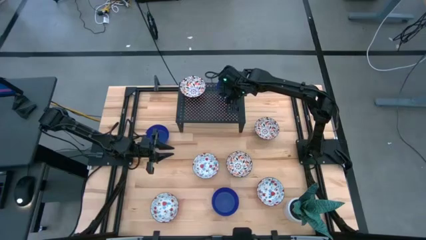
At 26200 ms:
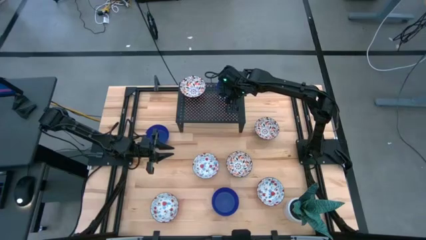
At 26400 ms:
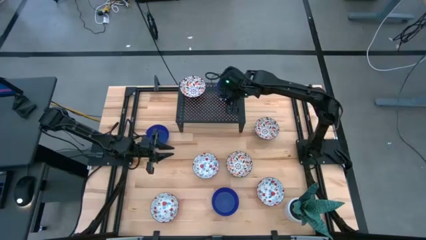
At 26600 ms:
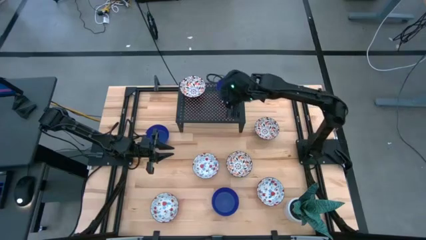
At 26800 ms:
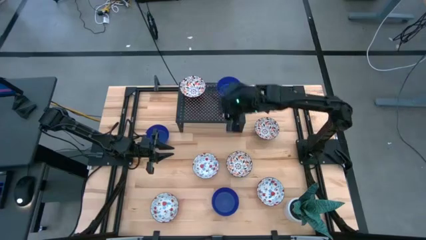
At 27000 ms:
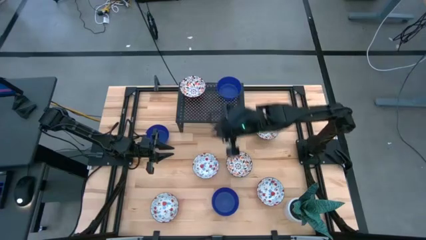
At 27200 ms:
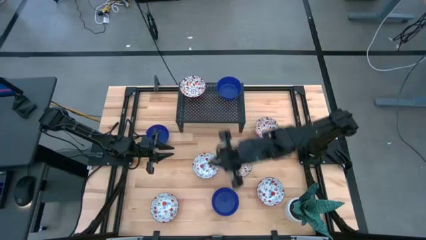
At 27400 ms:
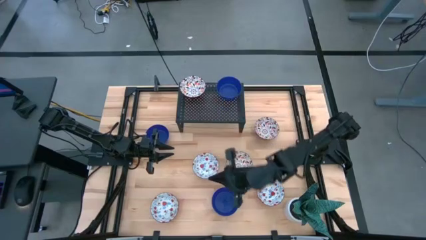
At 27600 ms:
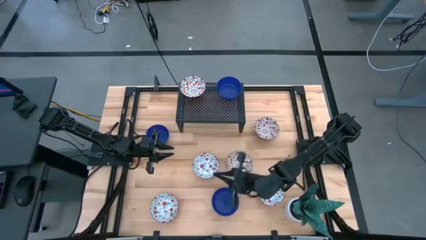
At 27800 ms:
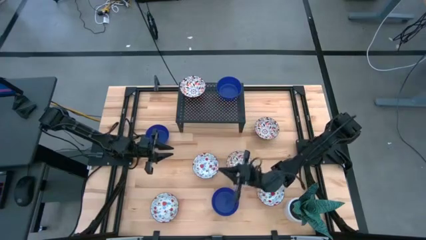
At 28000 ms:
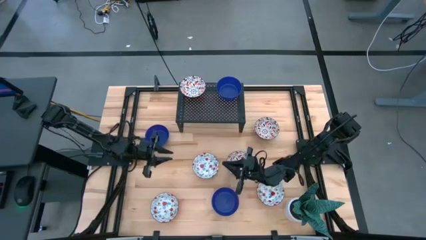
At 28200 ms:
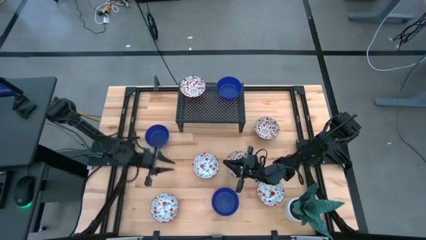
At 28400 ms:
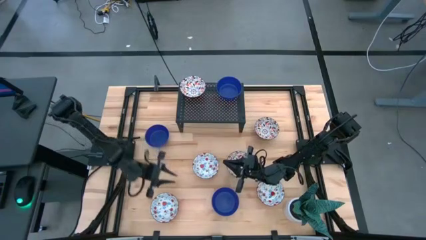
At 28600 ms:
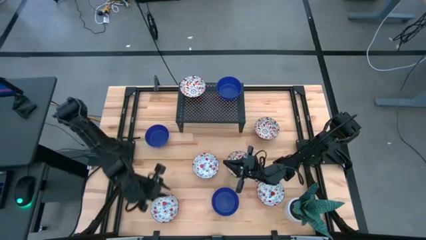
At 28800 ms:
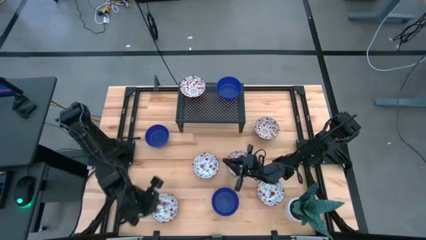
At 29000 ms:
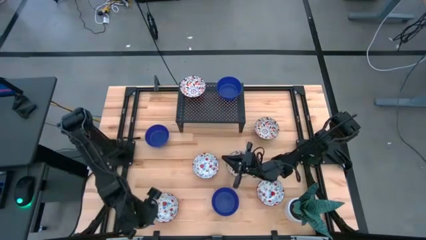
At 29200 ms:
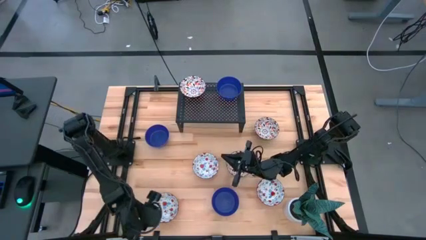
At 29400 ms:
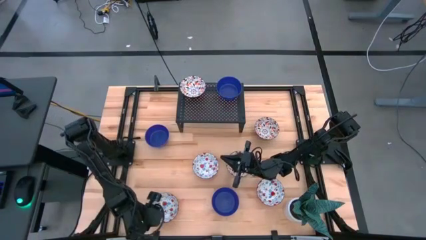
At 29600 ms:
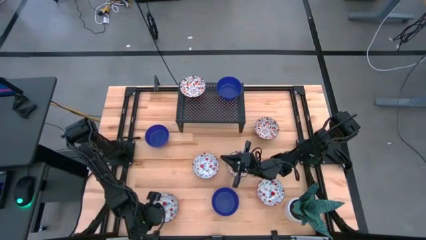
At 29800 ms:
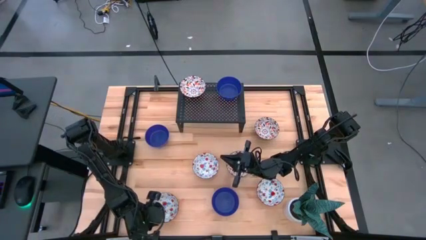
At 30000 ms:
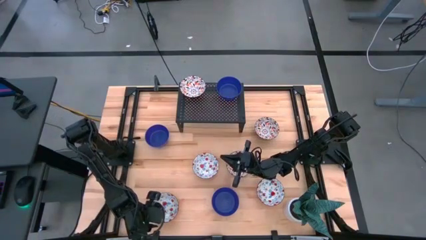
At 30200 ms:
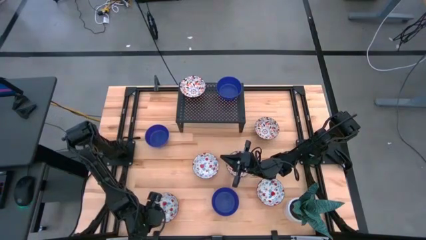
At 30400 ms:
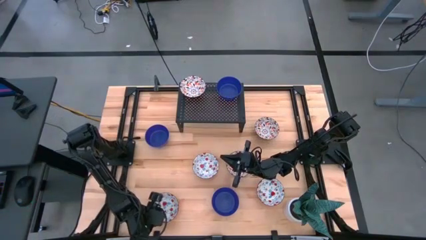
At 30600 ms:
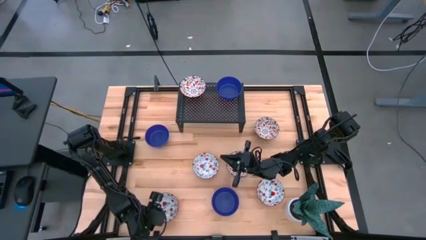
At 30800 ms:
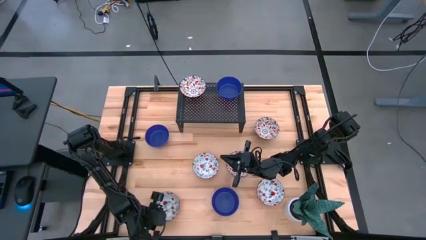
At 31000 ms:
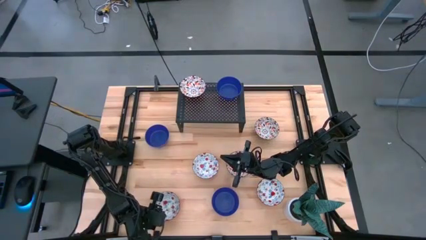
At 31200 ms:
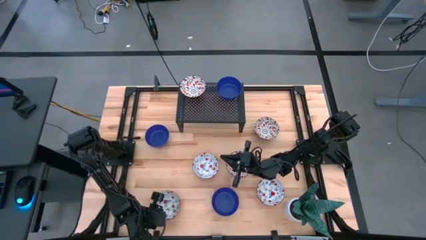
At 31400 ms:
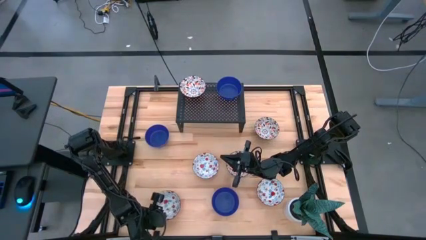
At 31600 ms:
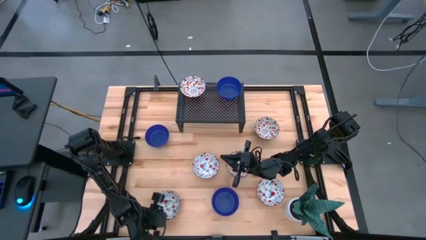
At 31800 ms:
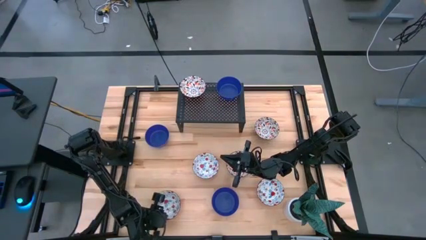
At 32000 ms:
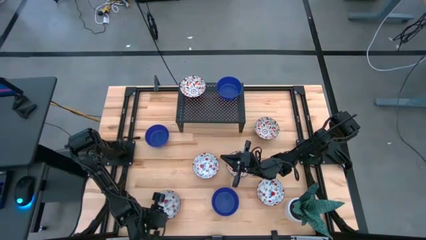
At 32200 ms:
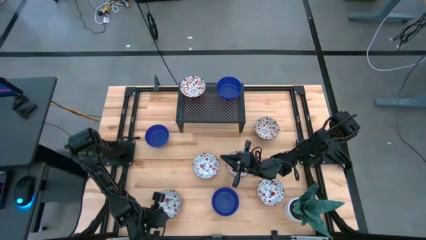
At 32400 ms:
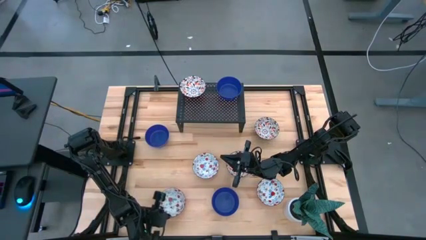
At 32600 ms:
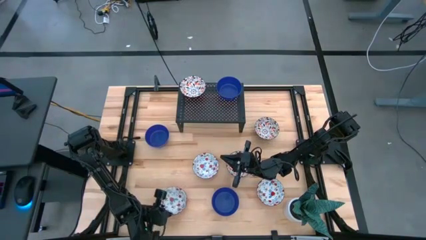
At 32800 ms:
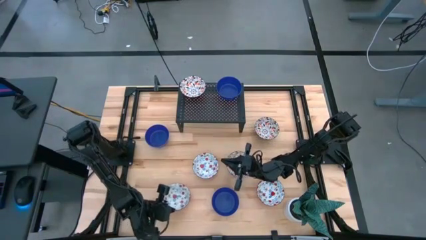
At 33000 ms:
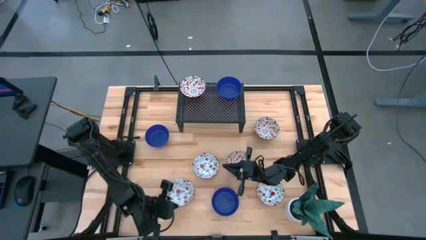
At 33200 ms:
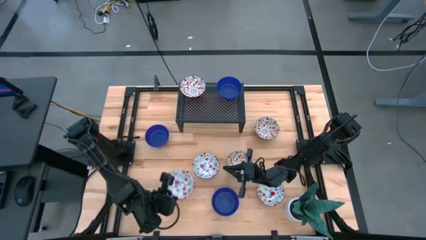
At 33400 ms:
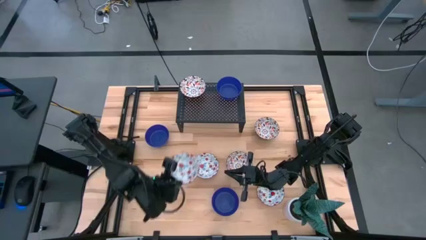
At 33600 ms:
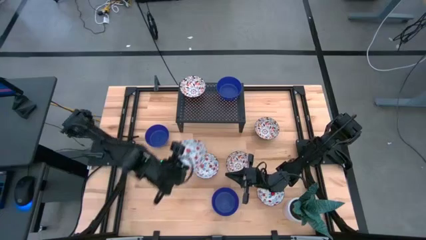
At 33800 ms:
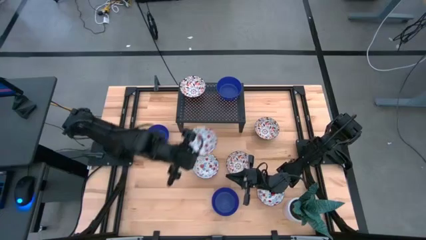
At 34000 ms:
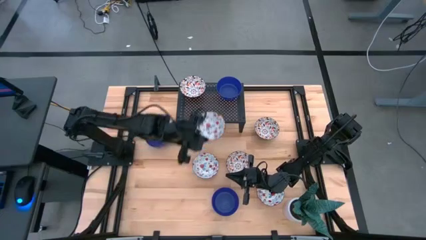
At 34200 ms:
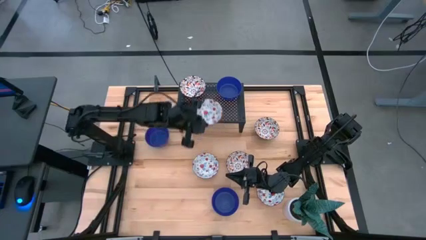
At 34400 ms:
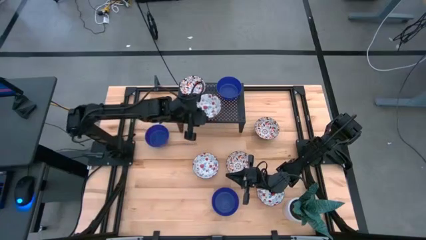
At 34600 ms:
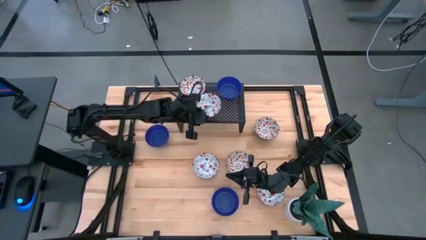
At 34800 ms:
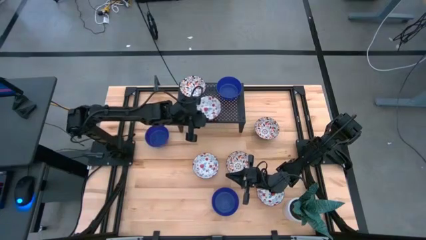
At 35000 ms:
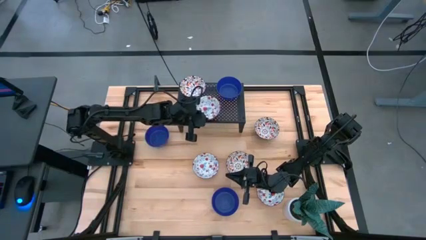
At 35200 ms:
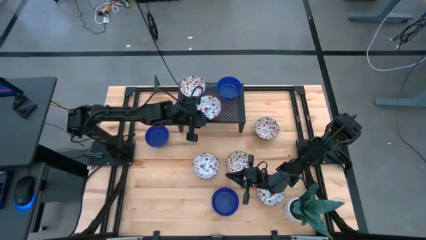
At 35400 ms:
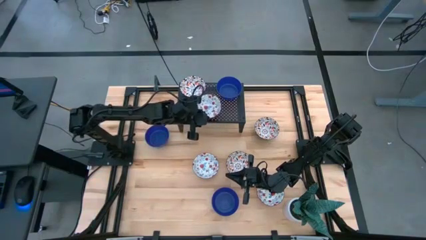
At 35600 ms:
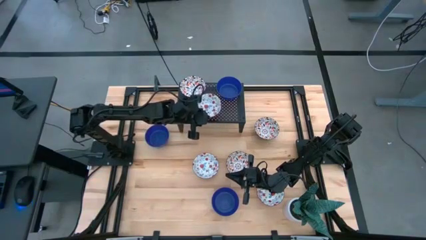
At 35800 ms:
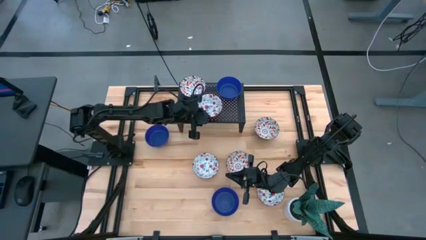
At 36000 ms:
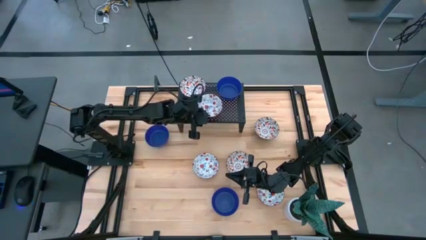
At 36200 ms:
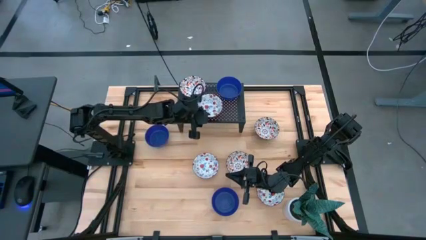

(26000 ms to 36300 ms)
Task: Pick & Place Mini bowls
Put the left red bowl on the shelf

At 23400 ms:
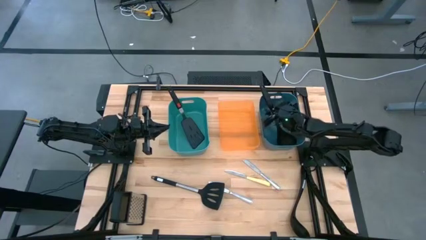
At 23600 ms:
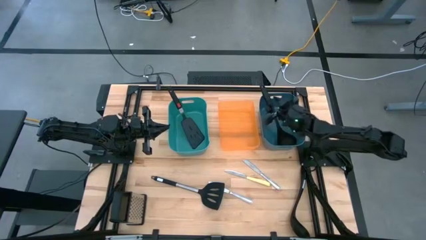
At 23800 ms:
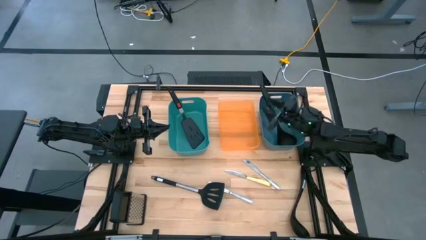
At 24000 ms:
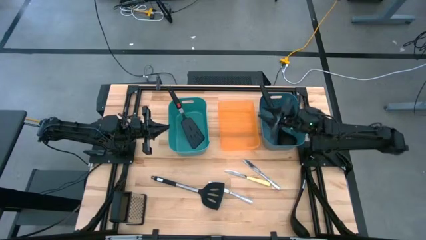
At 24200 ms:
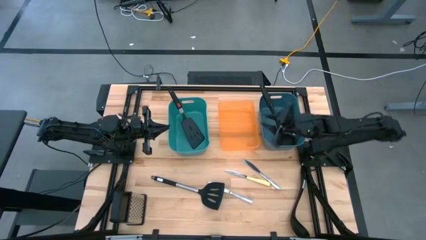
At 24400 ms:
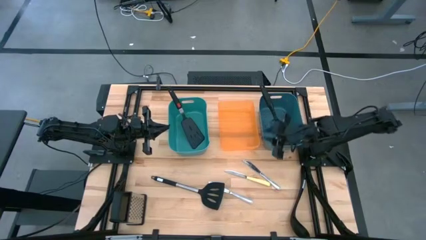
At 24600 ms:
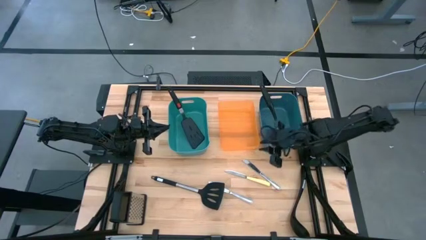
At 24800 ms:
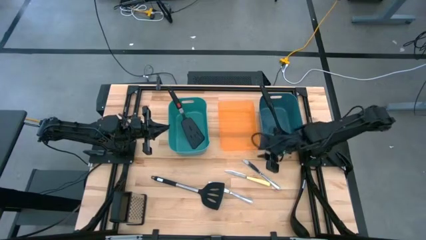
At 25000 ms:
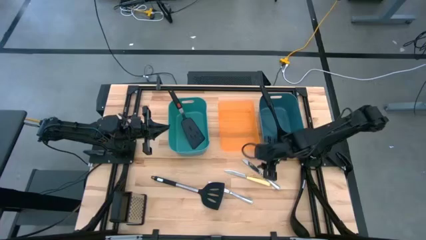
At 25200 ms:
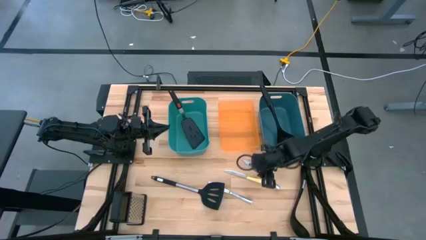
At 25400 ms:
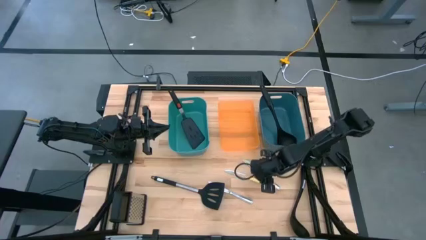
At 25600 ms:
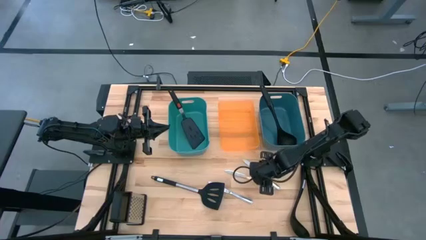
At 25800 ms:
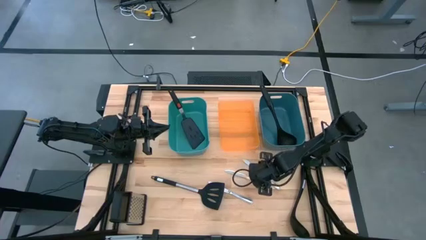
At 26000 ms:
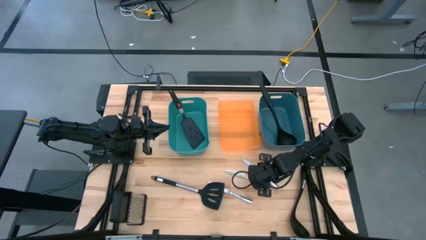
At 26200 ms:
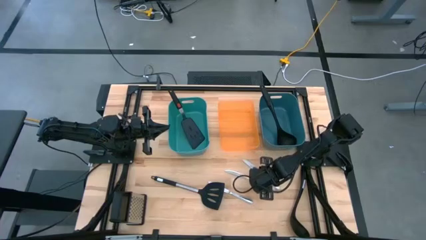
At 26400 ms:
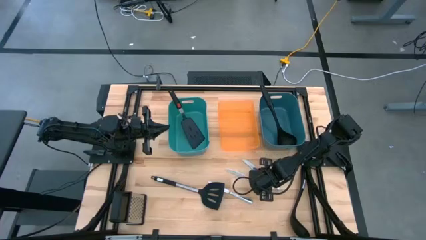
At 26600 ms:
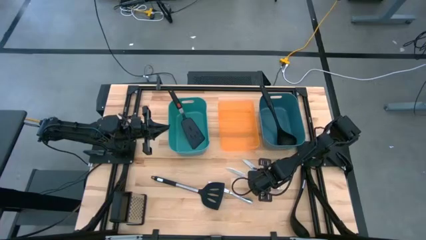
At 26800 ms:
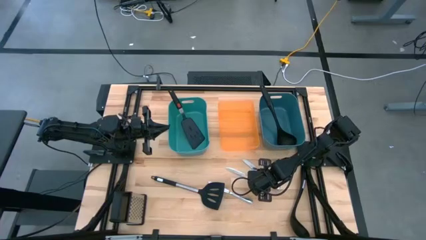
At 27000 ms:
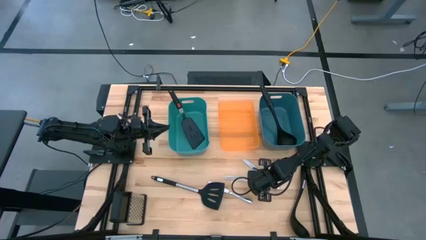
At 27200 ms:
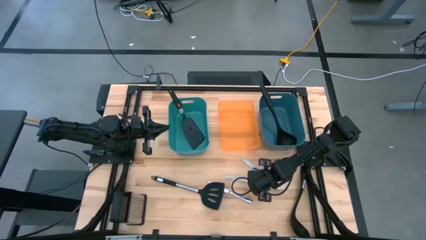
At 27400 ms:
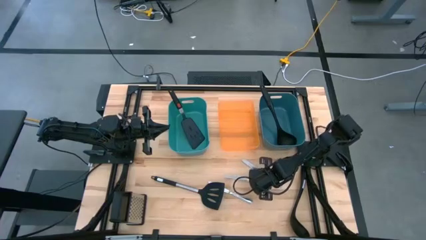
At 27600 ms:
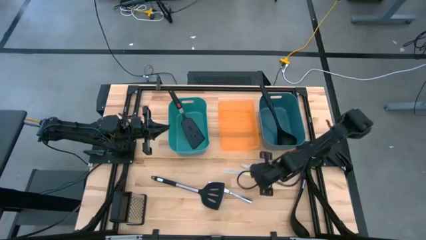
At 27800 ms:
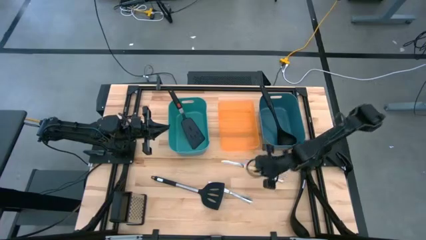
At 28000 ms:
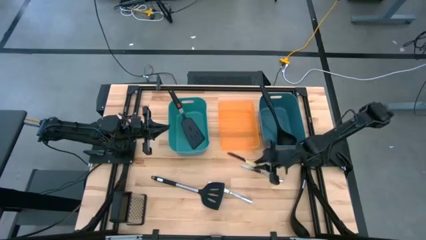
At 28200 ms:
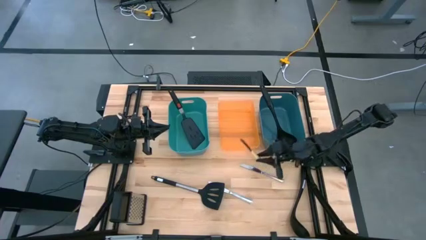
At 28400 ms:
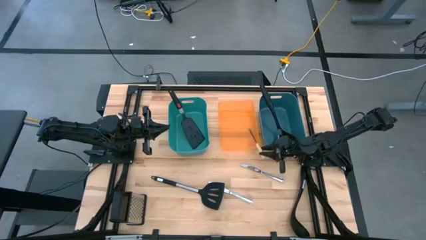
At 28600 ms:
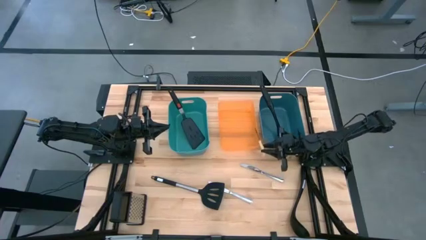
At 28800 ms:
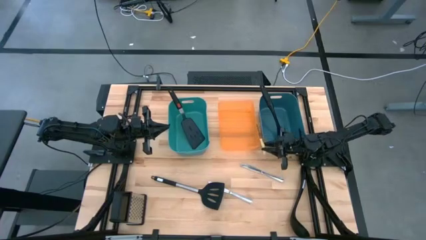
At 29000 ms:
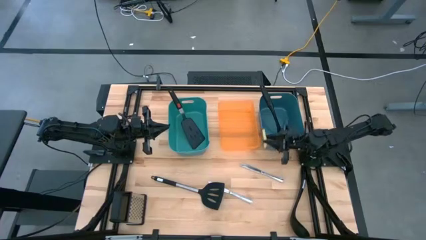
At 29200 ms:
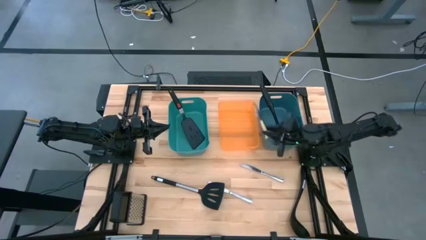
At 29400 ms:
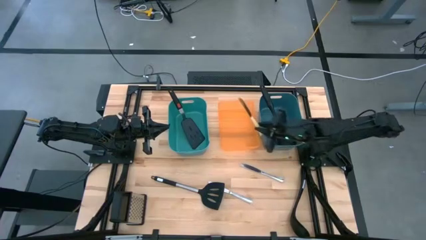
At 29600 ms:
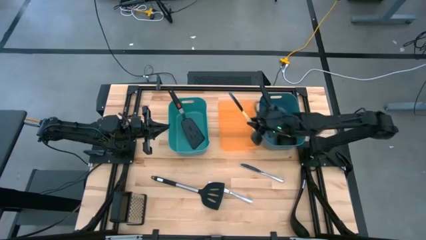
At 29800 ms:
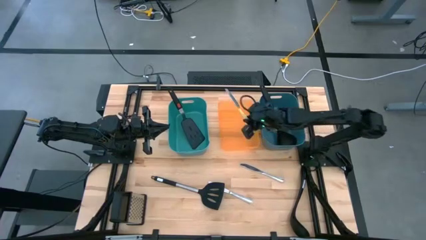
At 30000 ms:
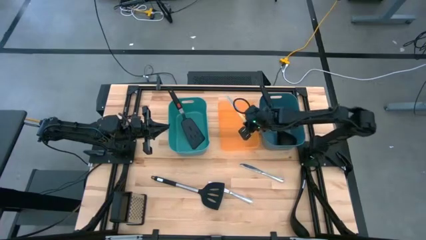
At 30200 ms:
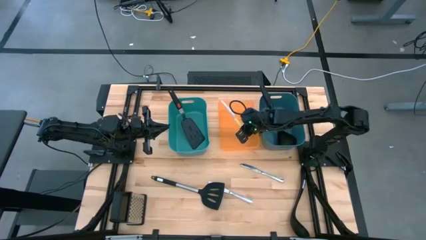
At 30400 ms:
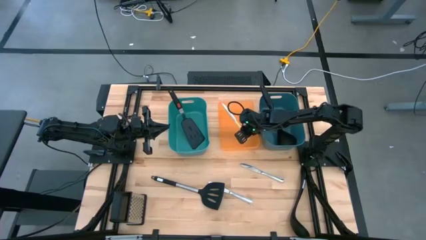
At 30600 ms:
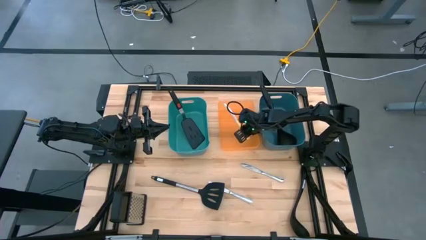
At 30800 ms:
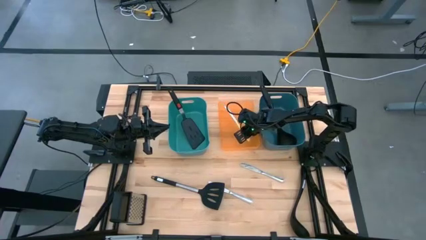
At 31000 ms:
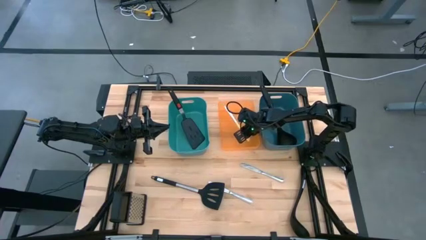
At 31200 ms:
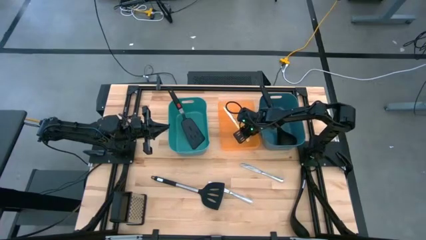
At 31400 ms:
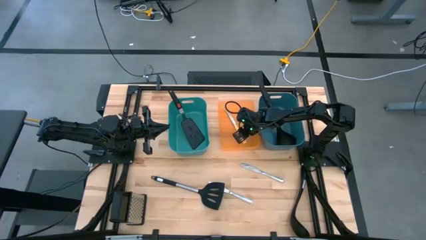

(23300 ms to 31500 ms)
Task: Pick & Place Kitchen Items
Put the yellow knife into the orange bin
